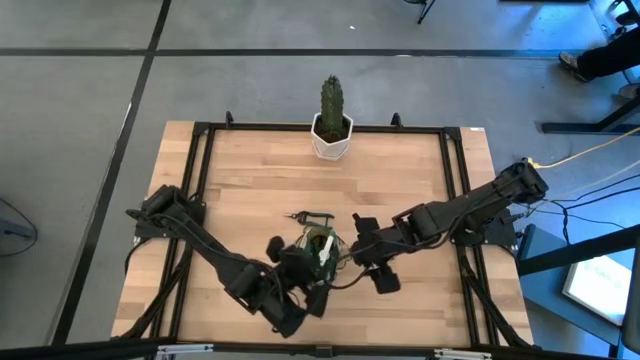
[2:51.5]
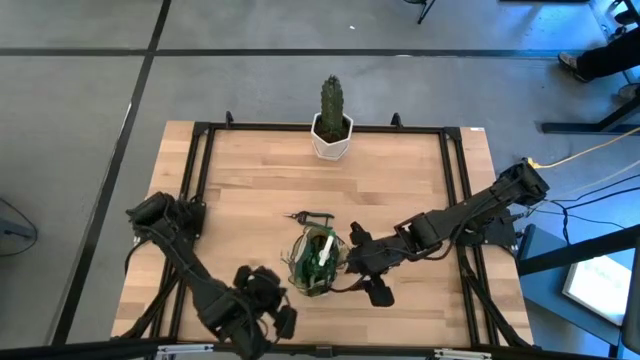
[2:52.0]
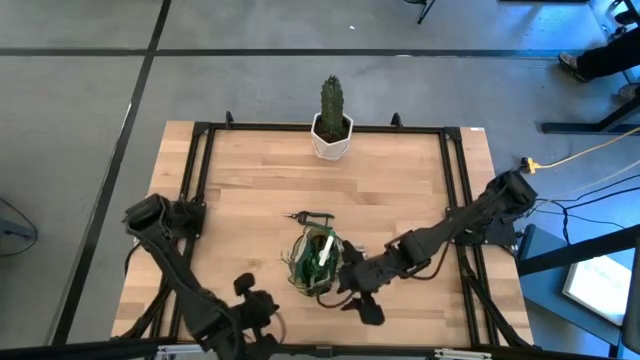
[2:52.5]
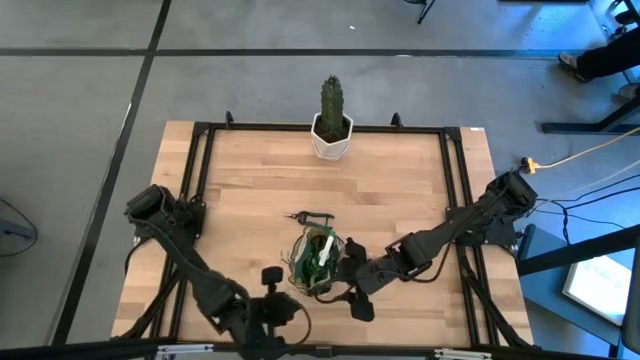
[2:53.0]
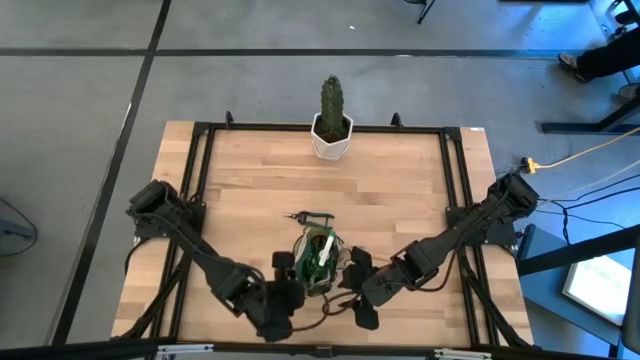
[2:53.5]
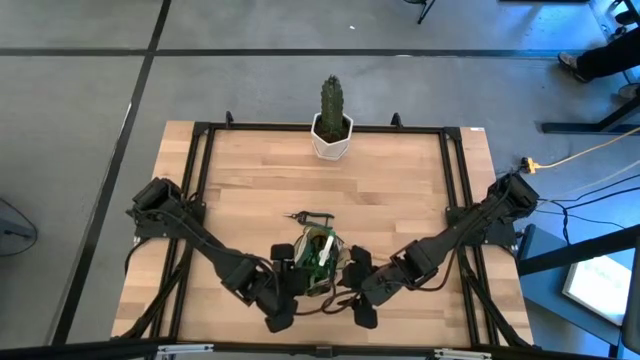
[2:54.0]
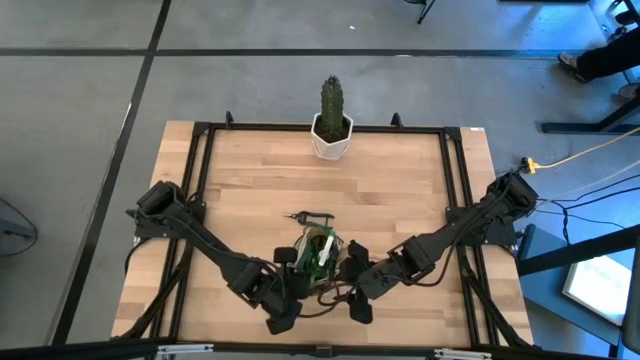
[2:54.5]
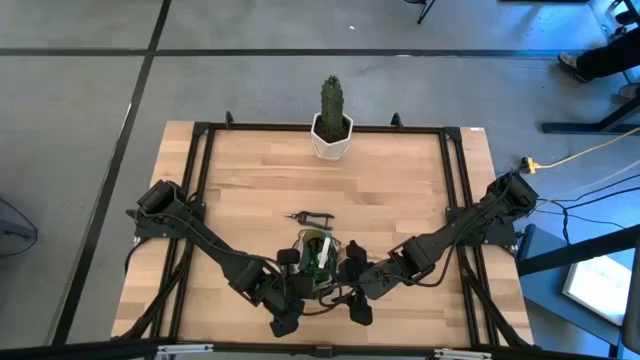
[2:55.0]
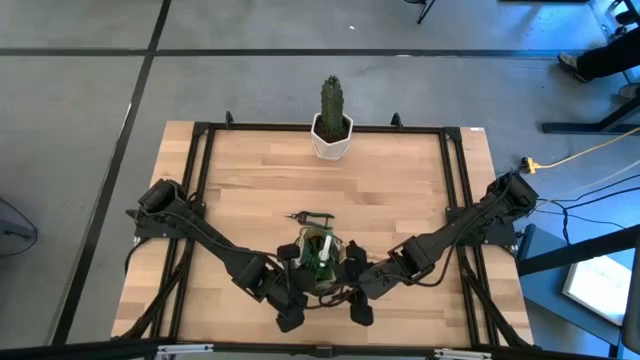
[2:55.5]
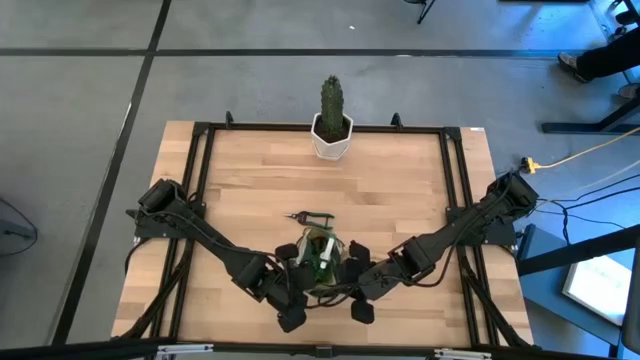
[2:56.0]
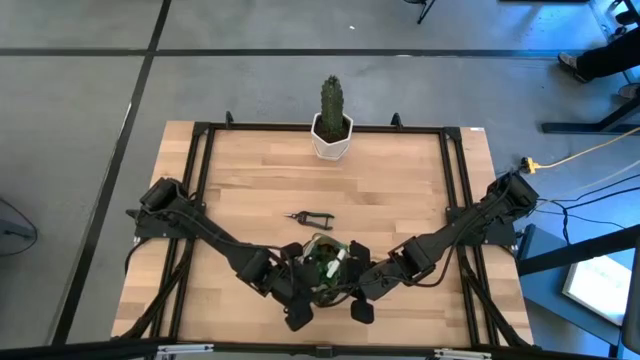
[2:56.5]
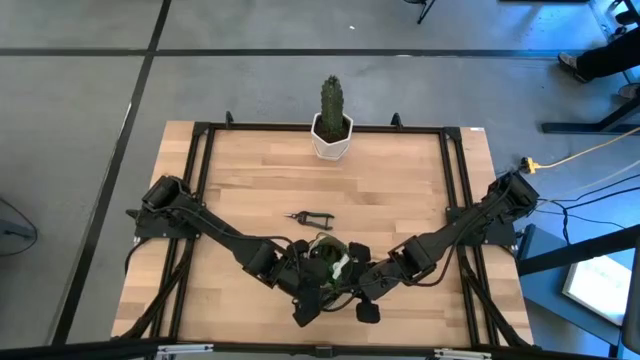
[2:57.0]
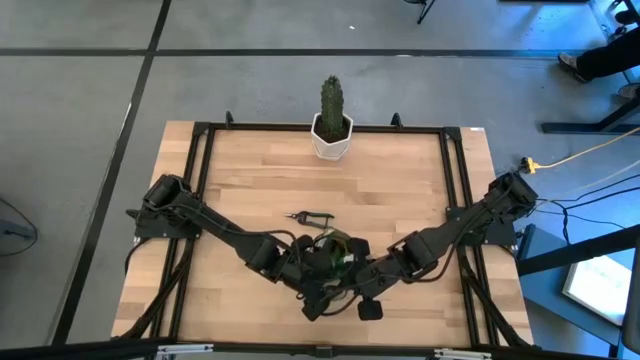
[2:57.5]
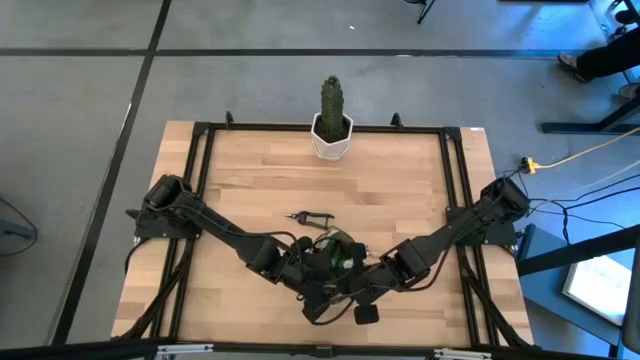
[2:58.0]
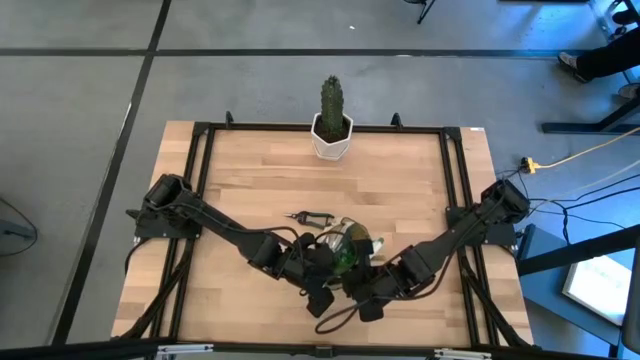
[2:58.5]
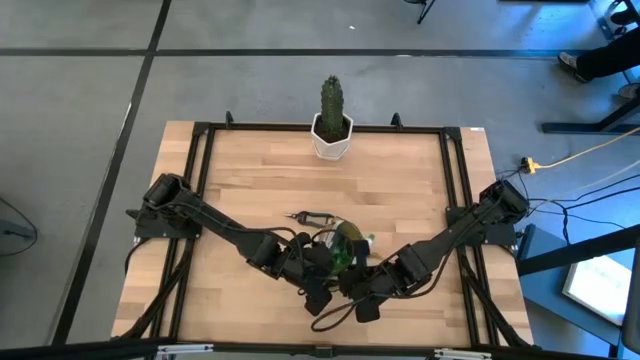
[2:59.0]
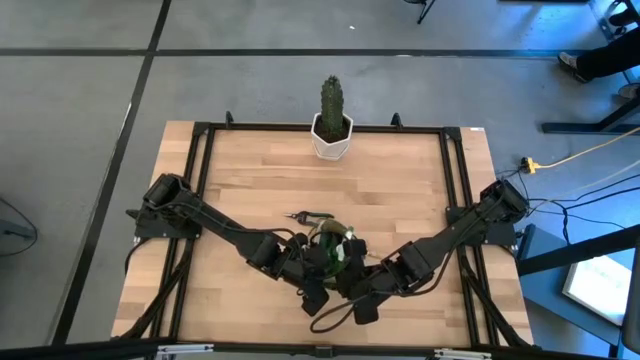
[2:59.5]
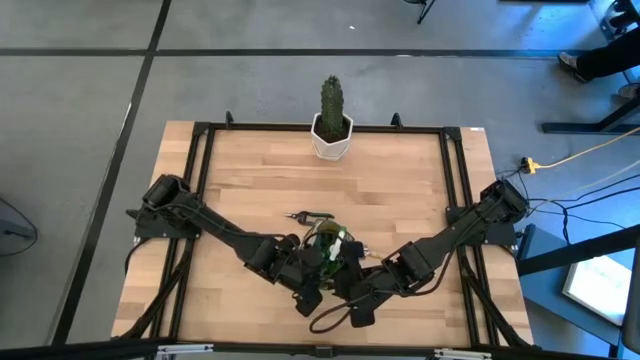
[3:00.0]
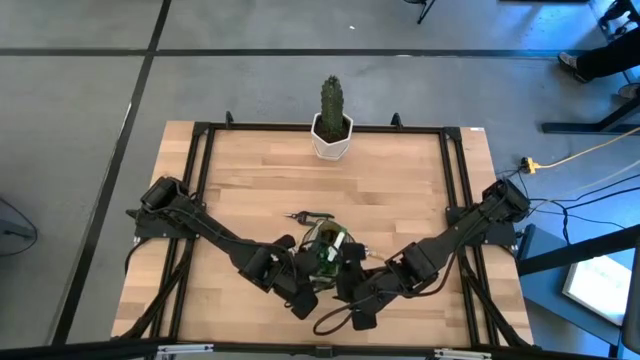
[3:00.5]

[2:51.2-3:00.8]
Task: Pick & Place Garden tools in Gardening bag
Adjust the gardening bag

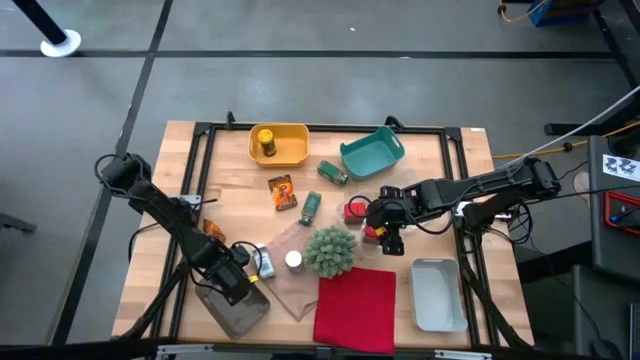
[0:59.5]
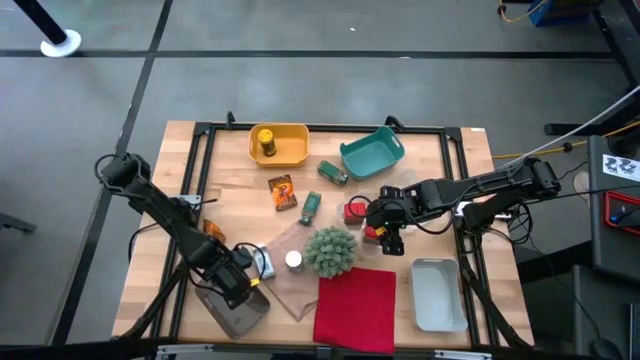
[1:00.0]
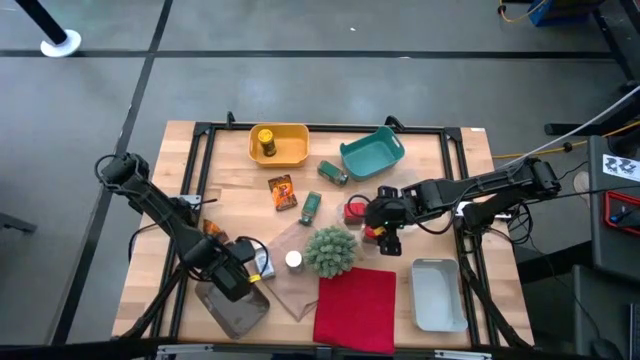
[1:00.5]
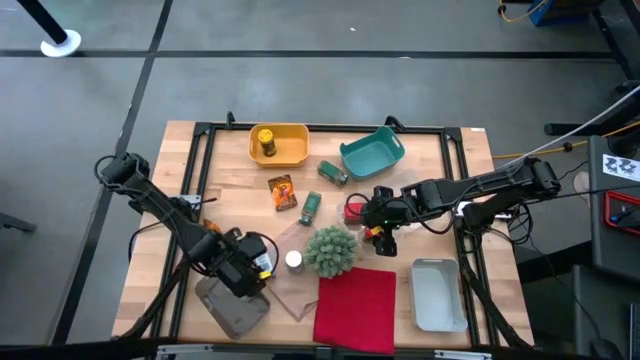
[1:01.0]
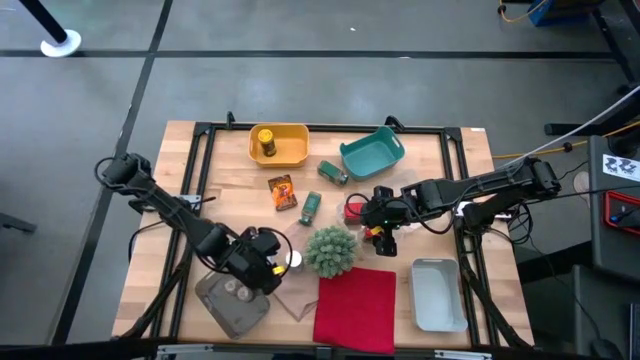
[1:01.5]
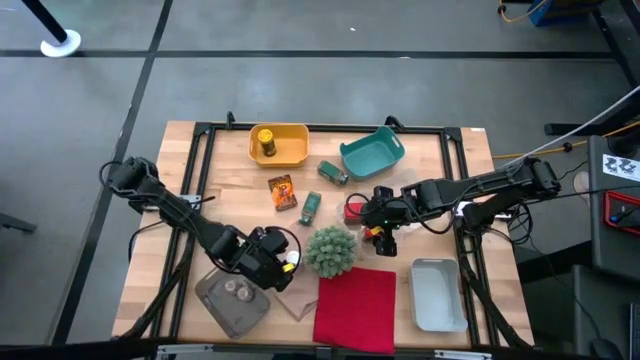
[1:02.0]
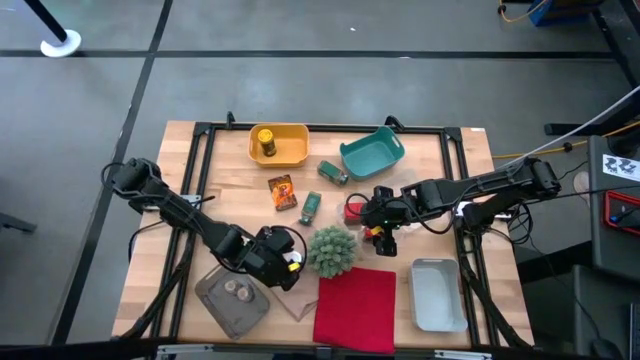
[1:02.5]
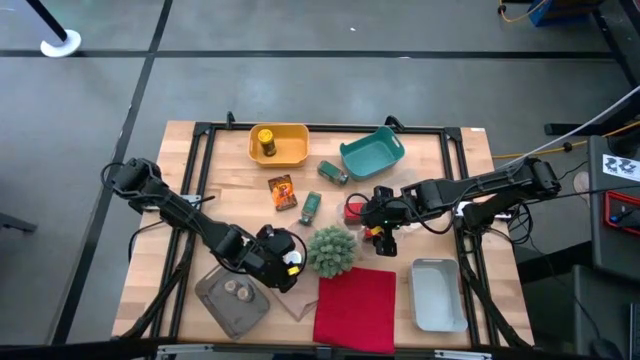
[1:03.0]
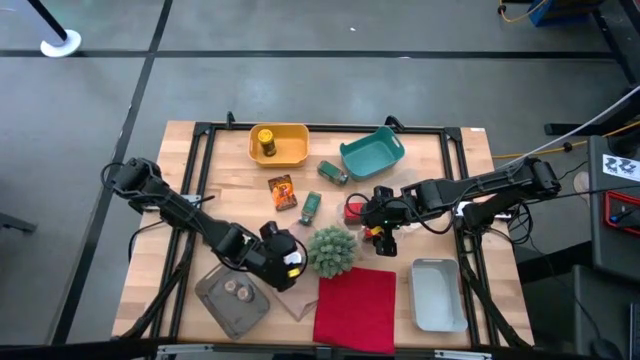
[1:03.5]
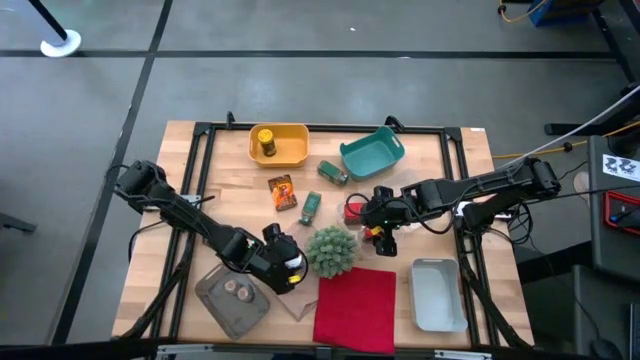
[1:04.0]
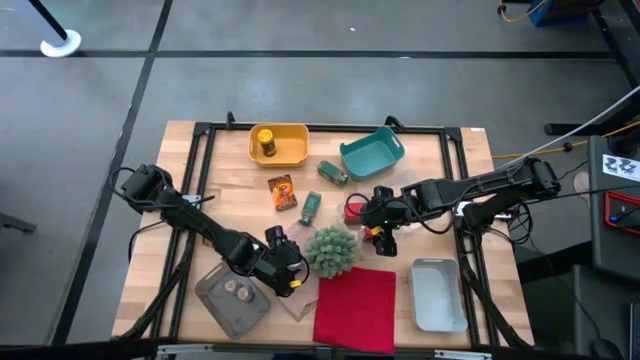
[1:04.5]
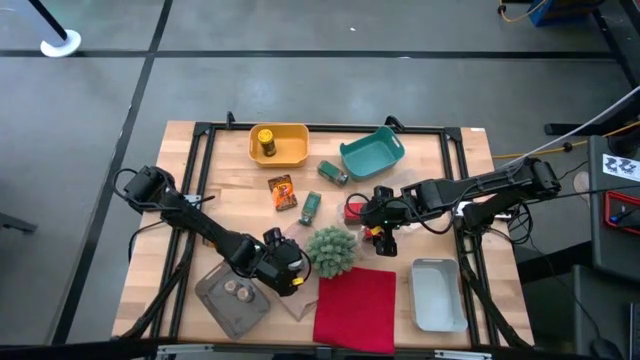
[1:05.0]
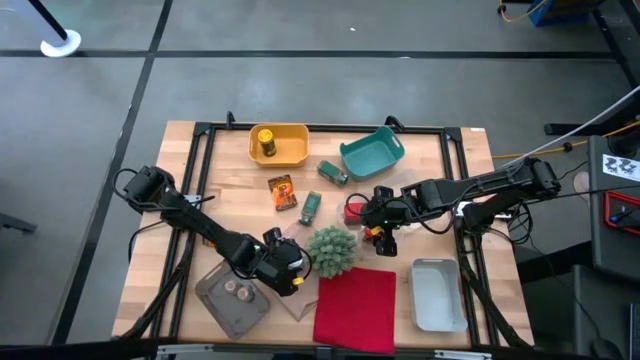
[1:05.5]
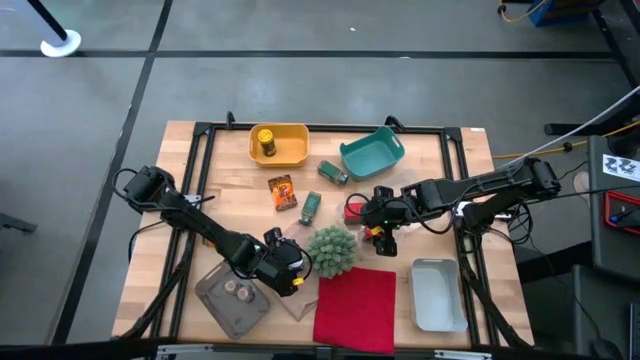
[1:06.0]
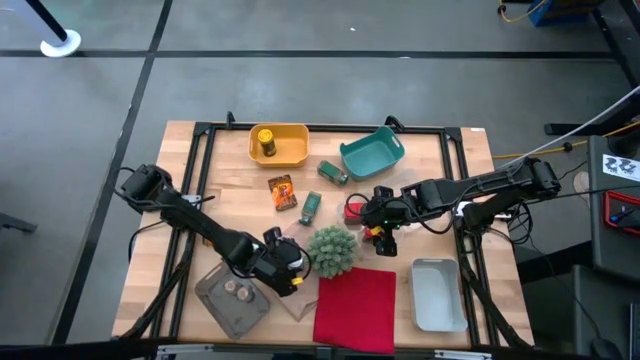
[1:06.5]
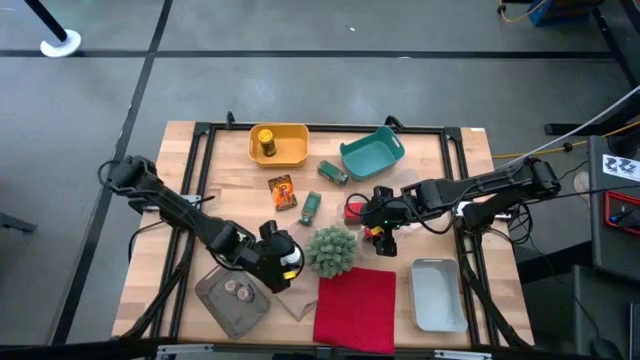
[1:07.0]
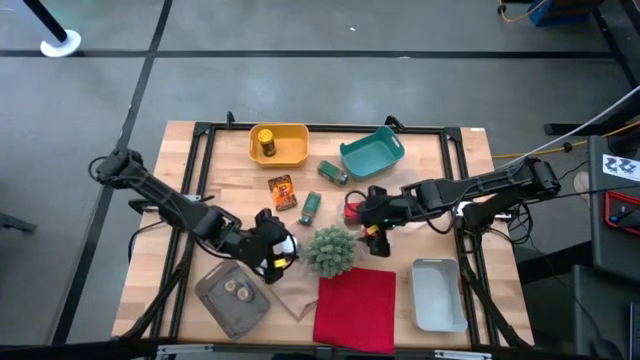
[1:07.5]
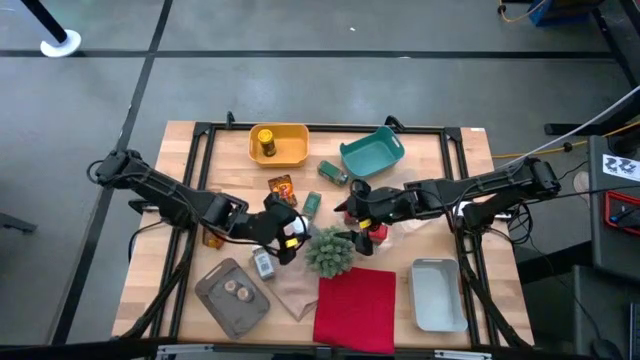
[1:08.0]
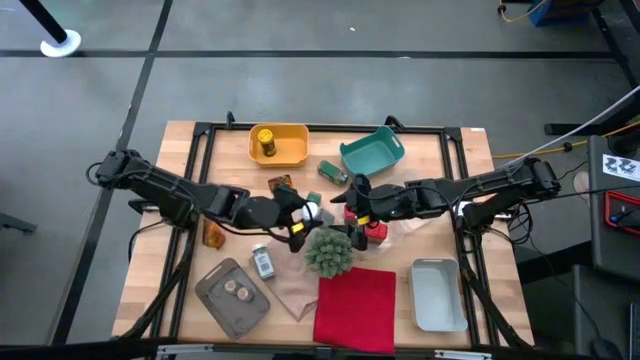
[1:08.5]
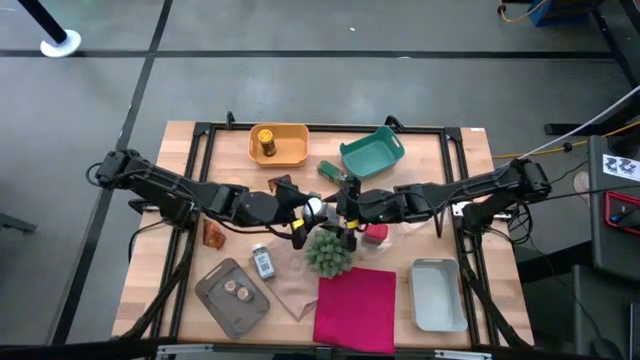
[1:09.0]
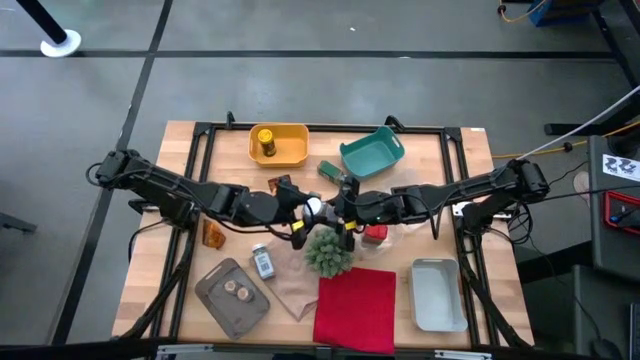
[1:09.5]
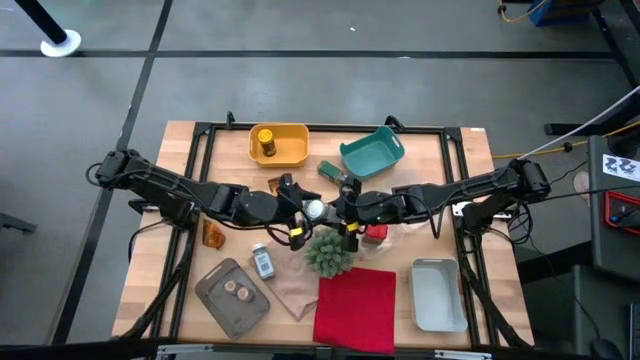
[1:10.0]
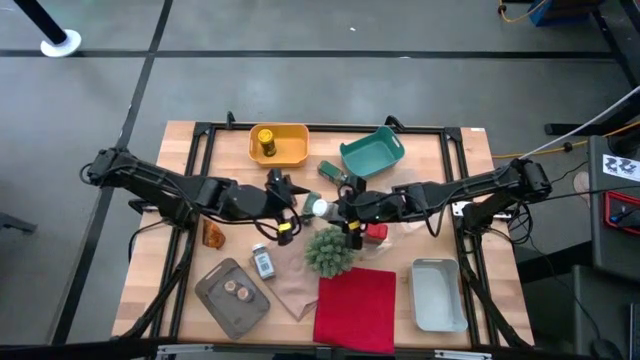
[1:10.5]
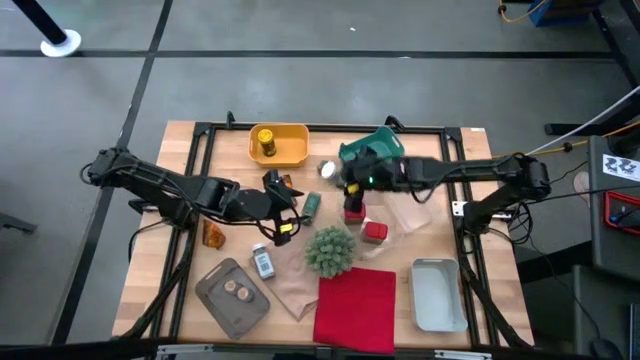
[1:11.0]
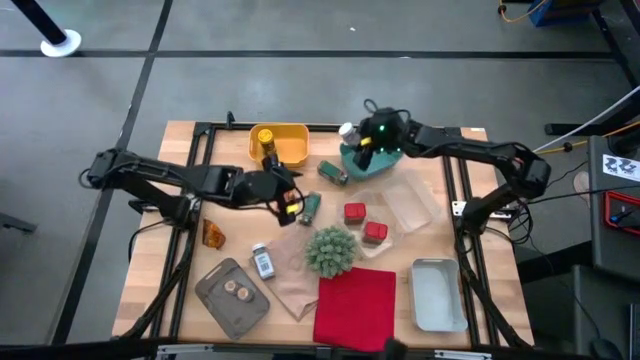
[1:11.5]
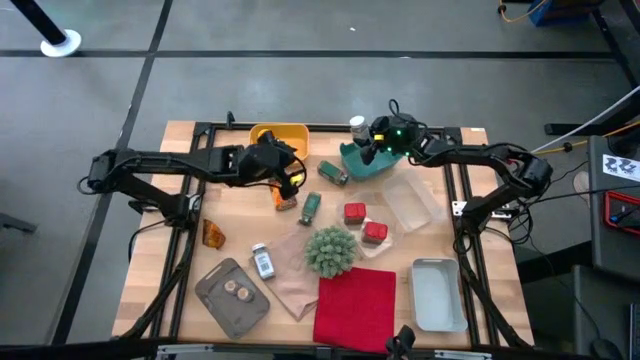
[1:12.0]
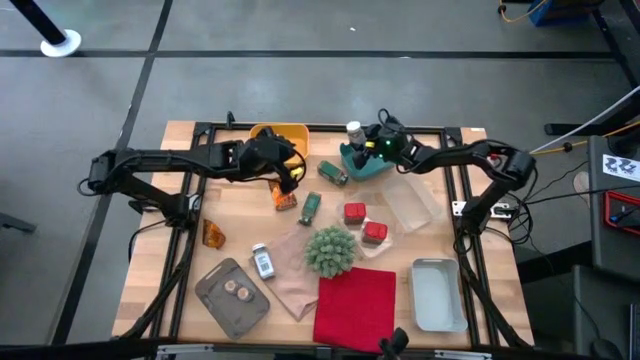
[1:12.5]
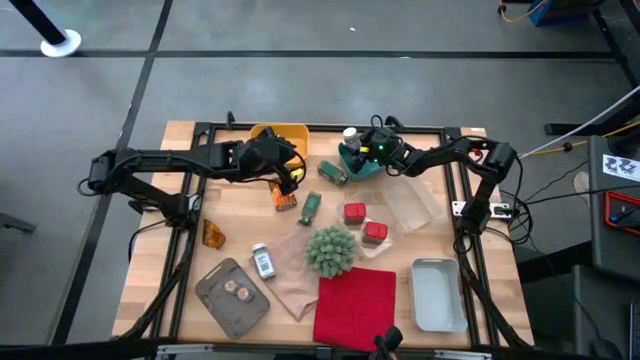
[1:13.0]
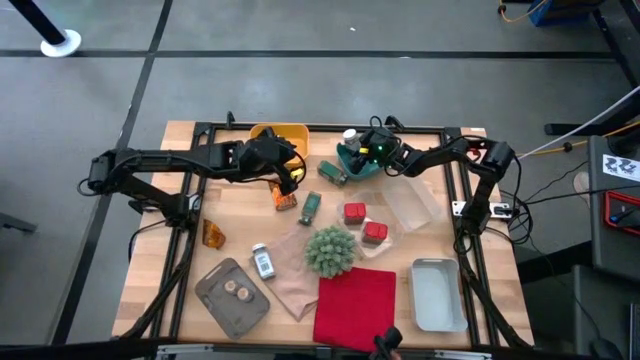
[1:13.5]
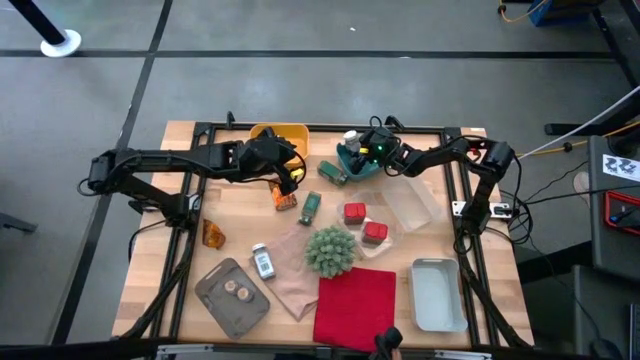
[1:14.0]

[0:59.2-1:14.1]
Task: Sort spices by type
Put the right white seasoning bottle into the green bin
